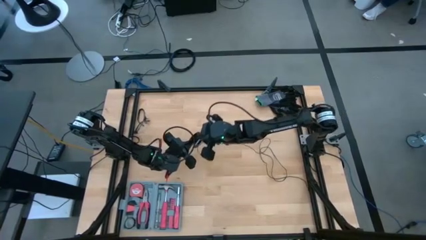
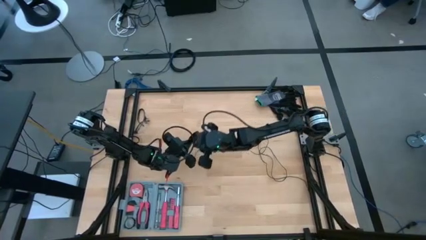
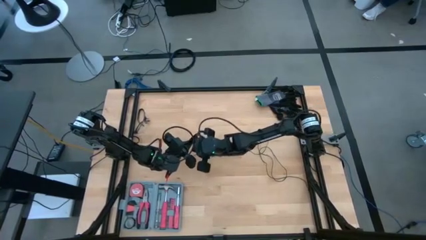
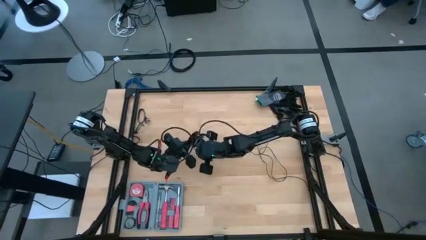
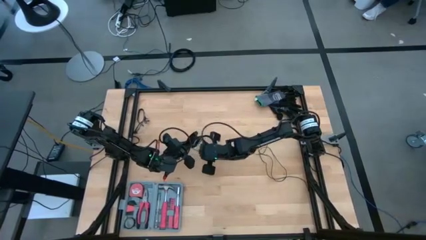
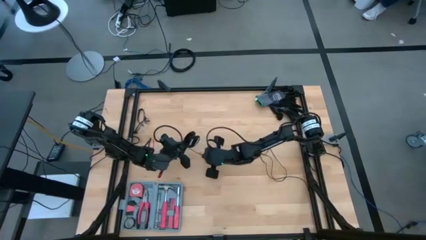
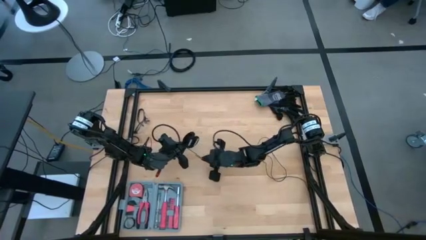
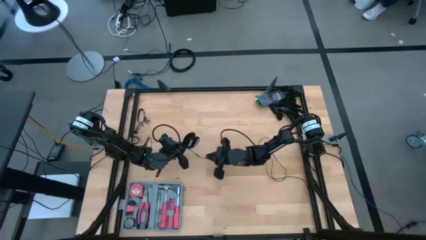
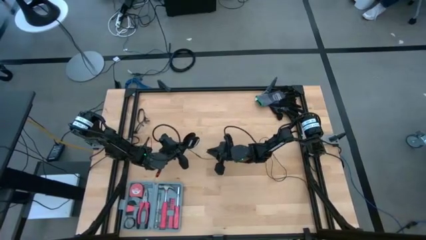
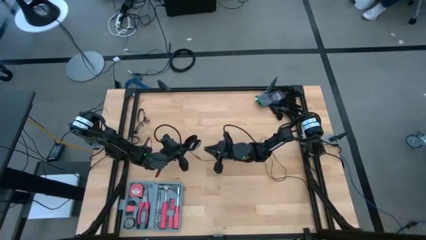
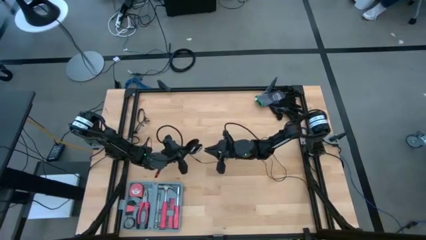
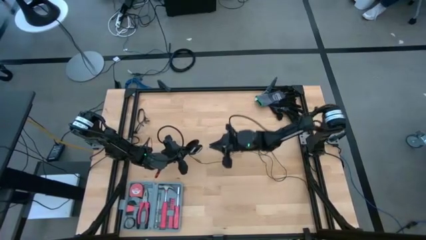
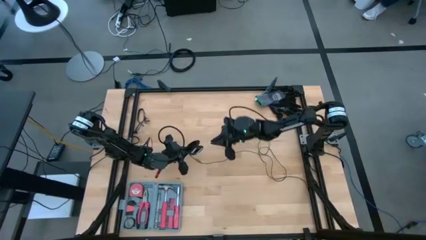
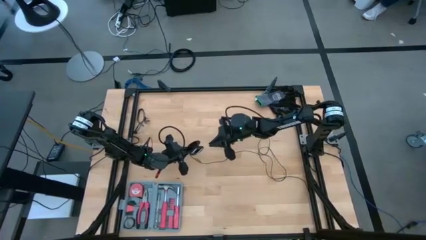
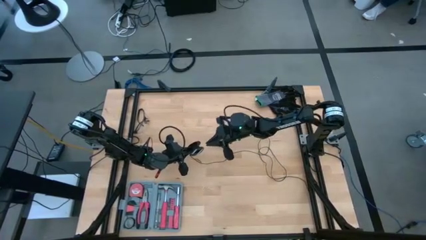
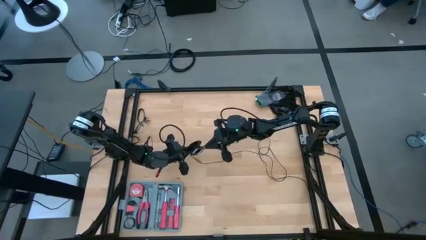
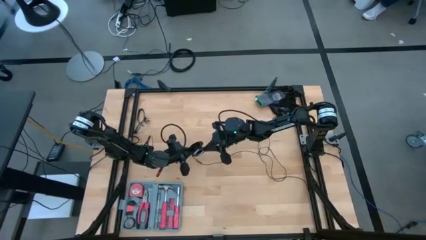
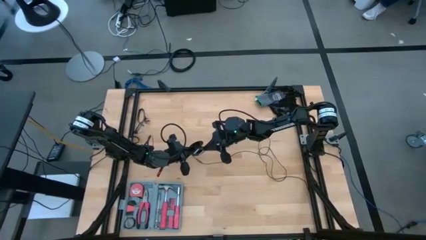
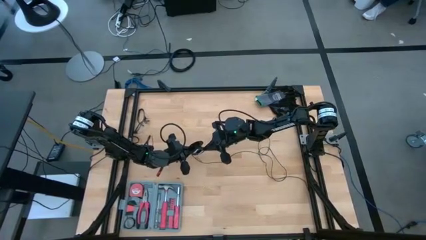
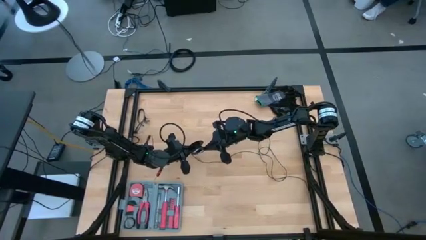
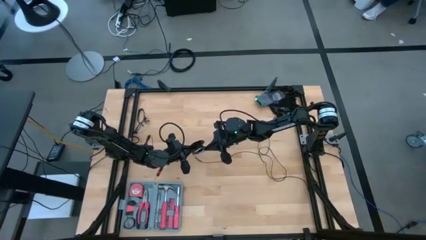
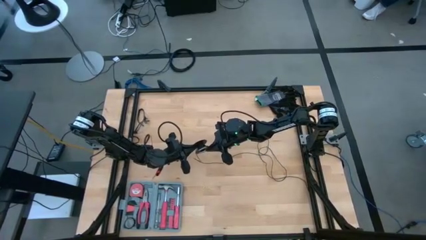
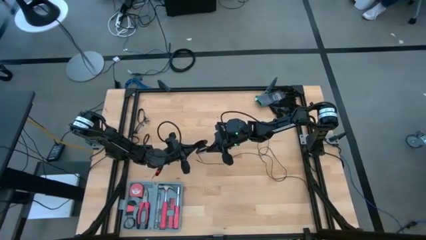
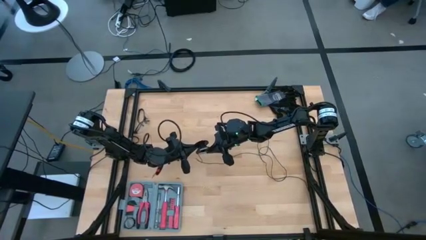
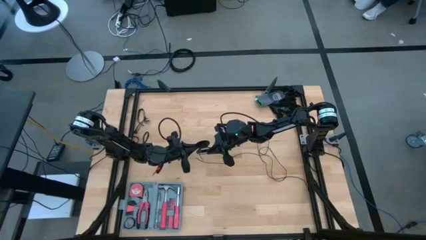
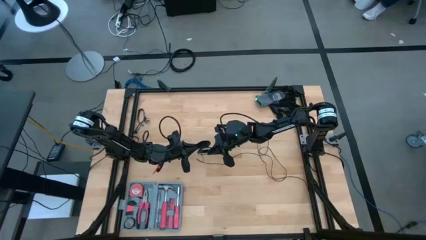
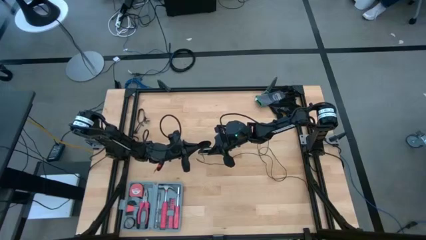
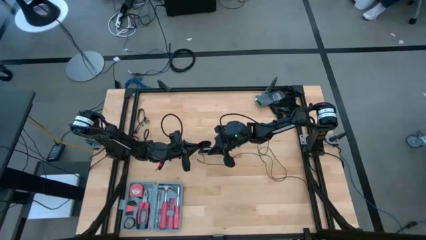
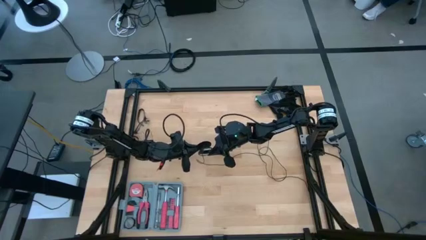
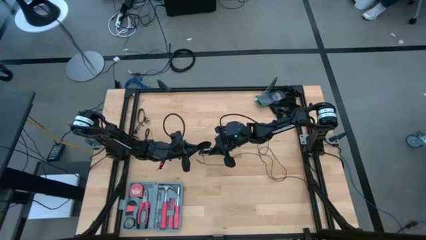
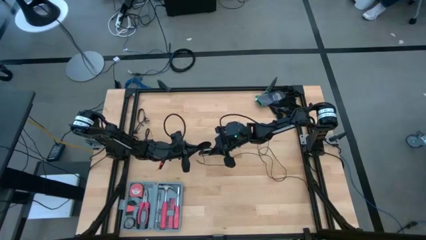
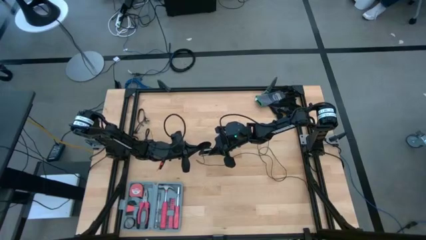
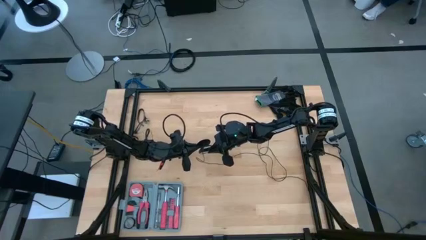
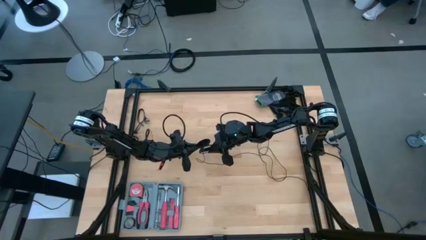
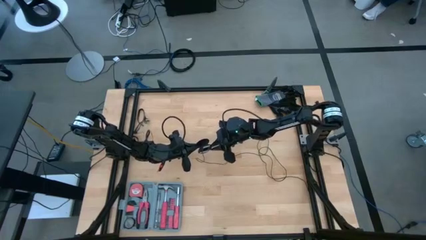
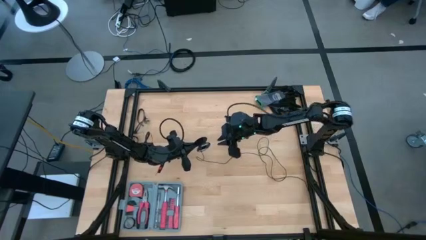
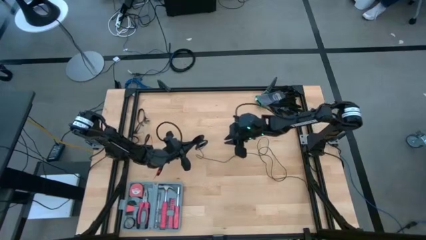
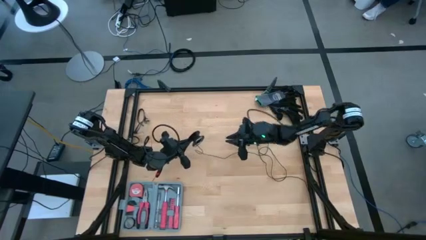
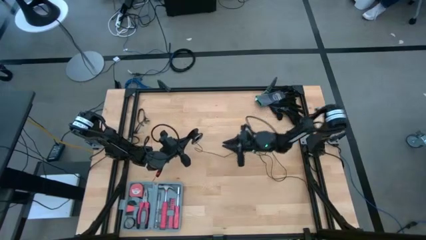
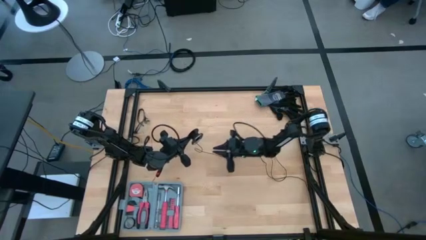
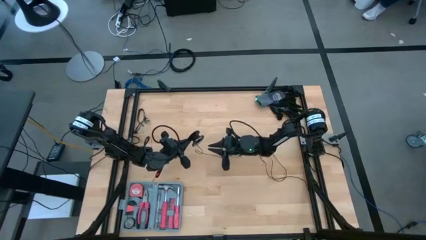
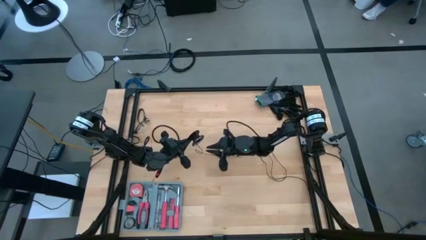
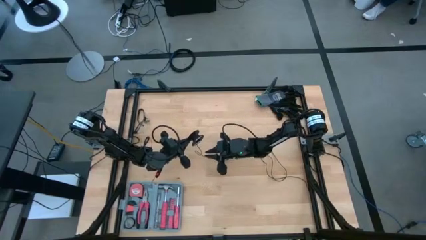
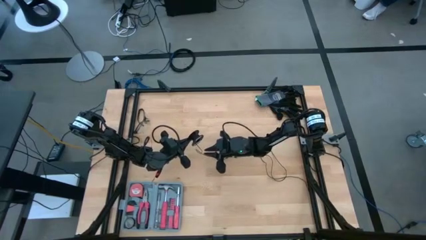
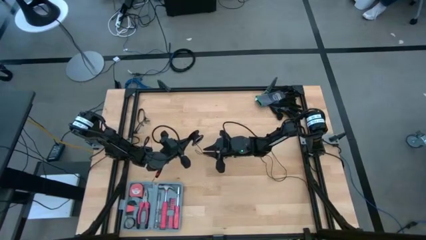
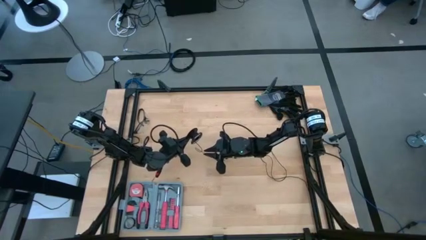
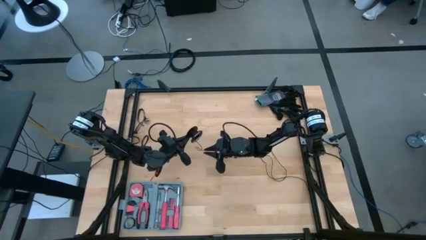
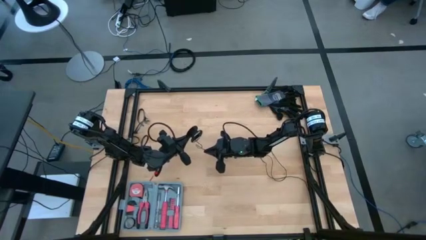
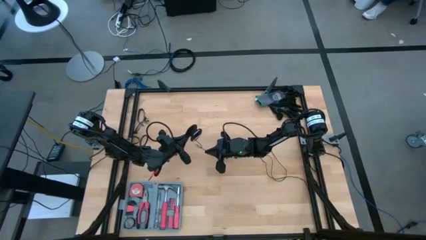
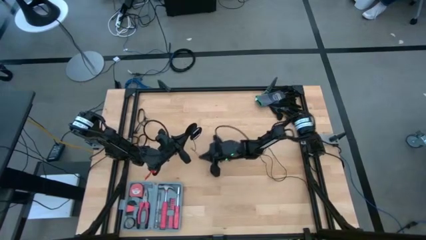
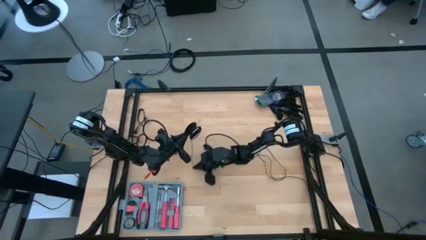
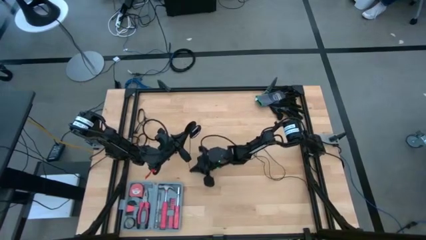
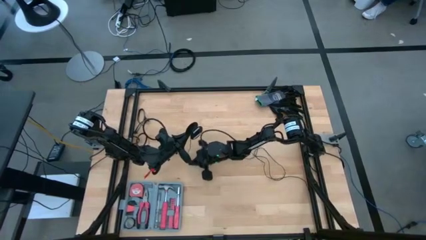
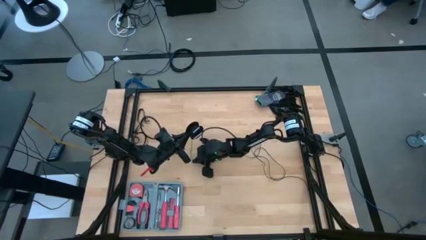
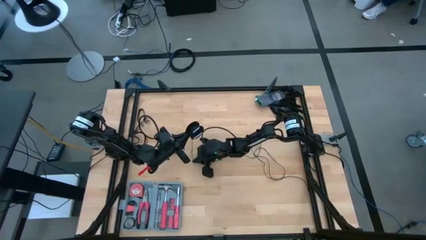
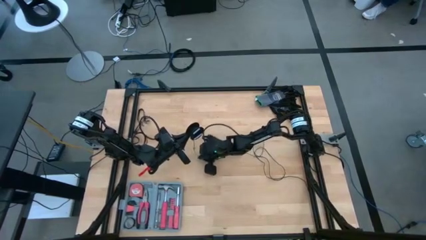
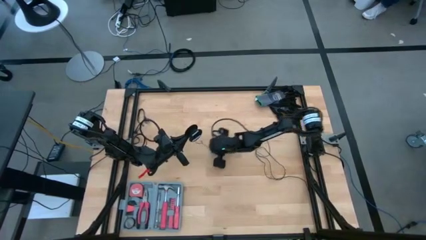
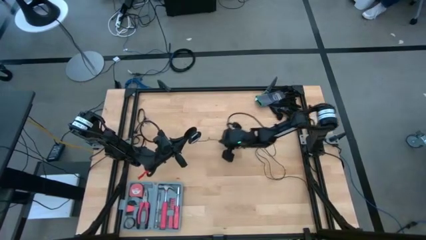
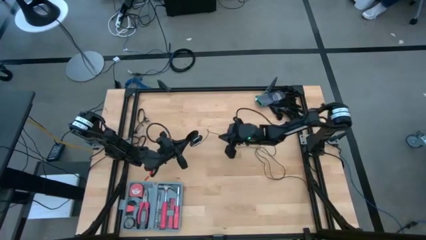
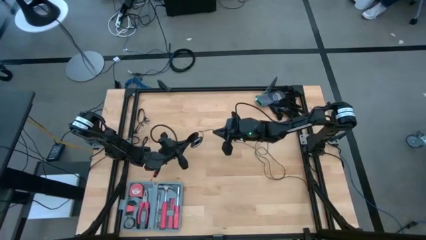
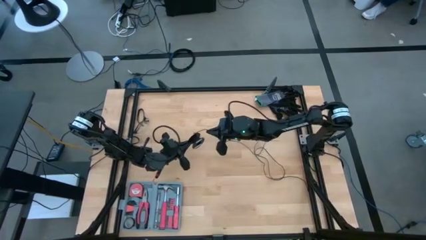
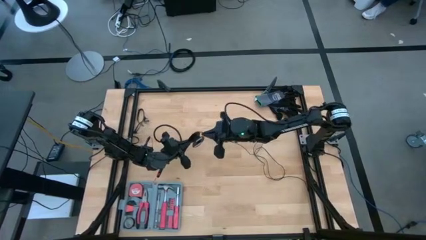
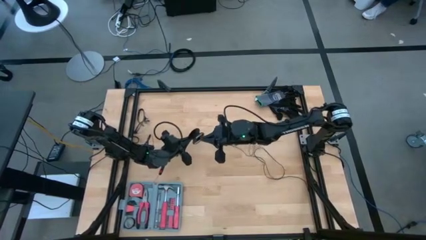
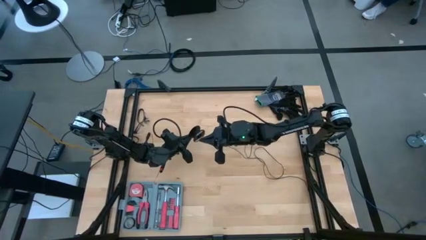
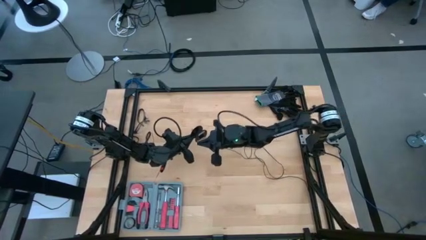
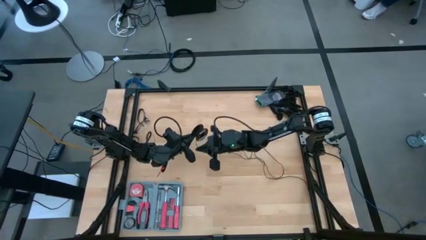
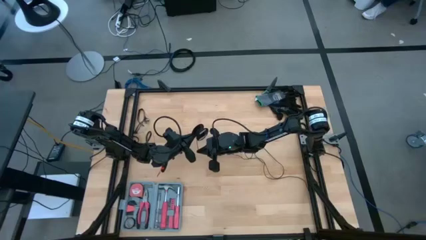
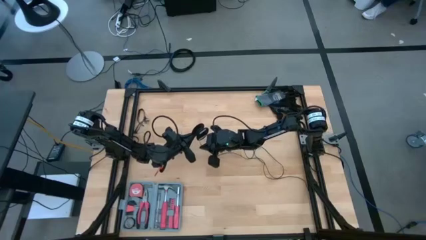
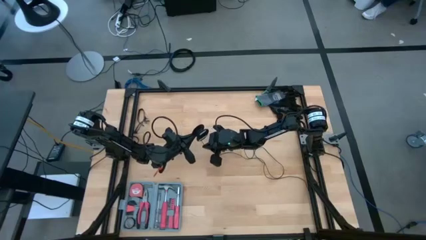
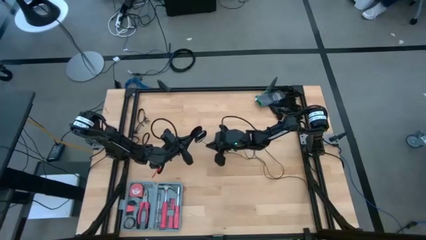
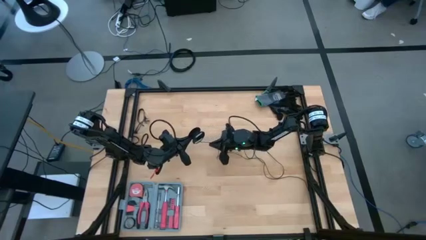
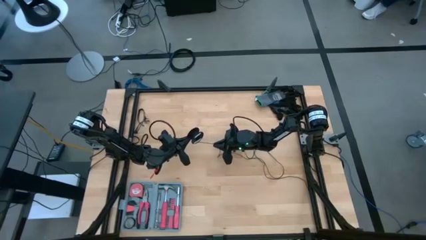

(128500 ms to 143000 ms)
Task: Coil cords
Coil the black wire onto the spool

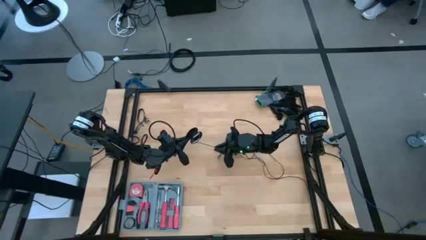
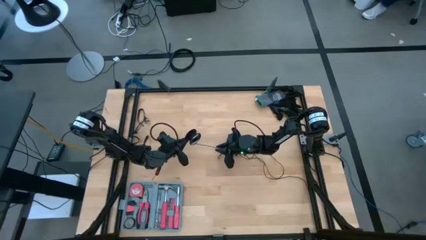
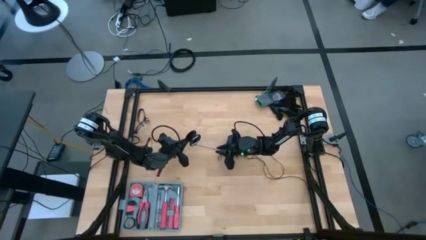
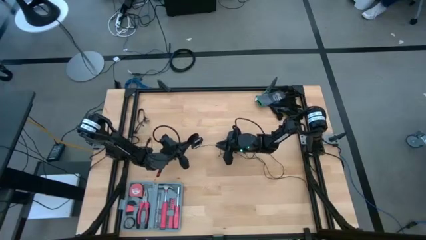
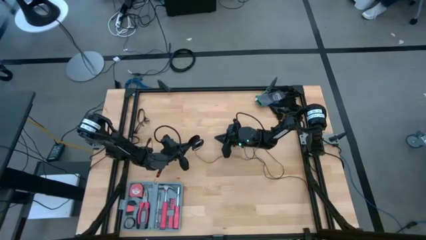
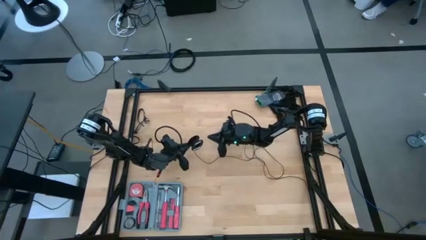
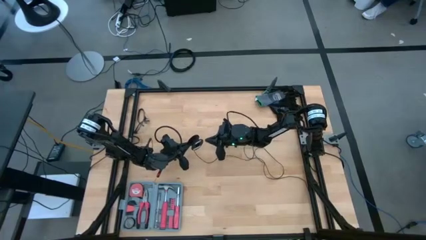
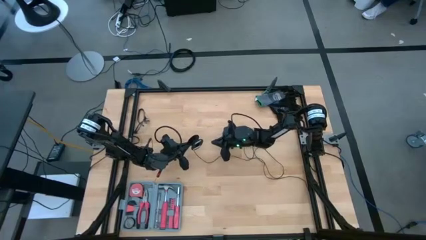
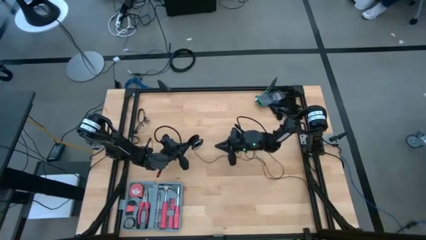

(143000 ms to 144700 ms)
Coil the black wire onto the spool
